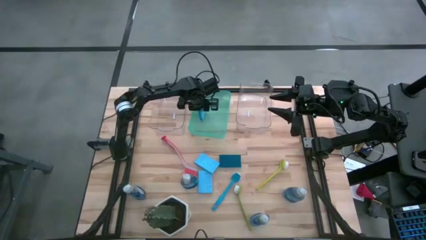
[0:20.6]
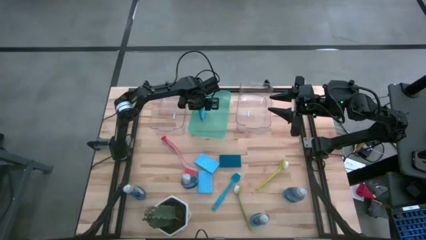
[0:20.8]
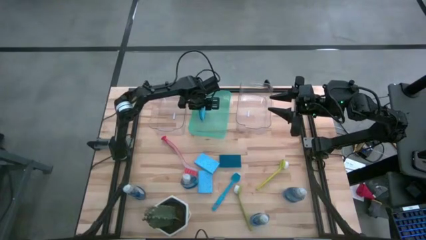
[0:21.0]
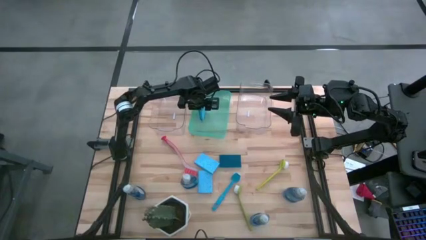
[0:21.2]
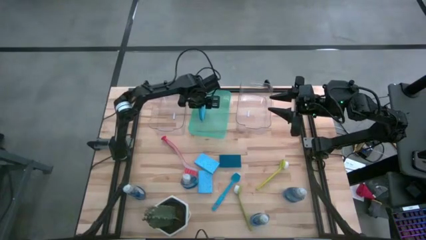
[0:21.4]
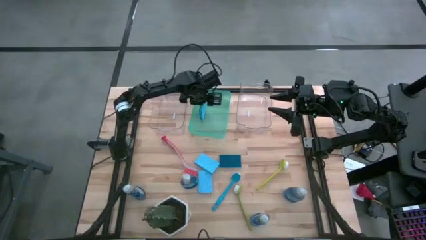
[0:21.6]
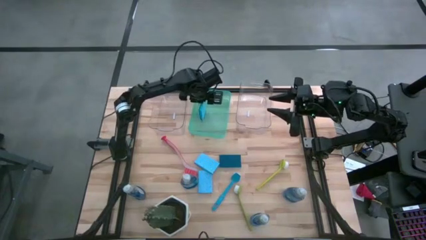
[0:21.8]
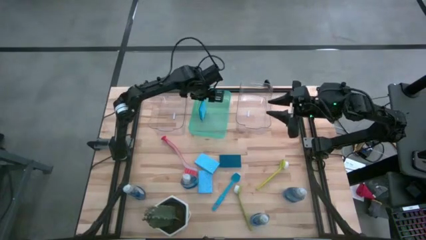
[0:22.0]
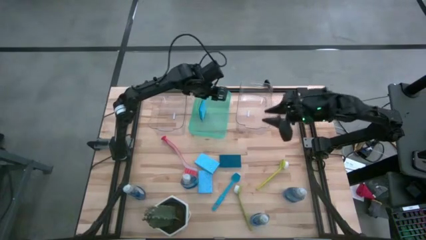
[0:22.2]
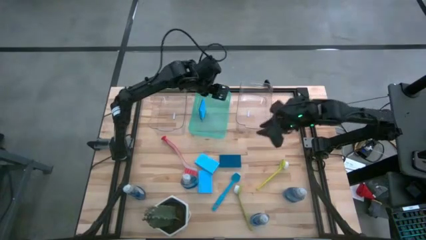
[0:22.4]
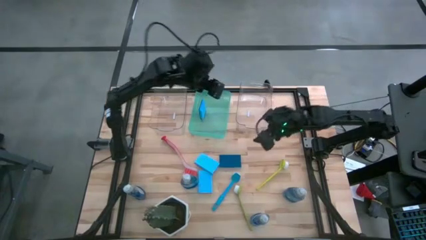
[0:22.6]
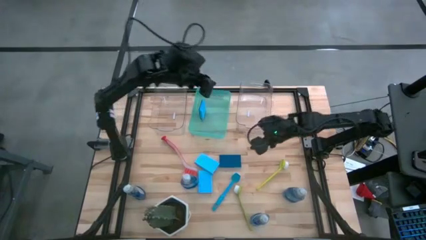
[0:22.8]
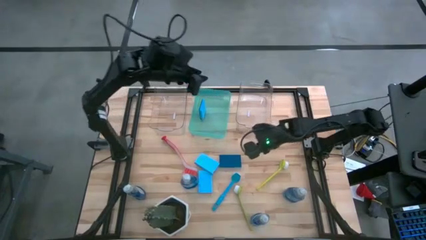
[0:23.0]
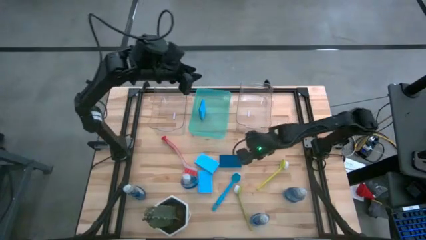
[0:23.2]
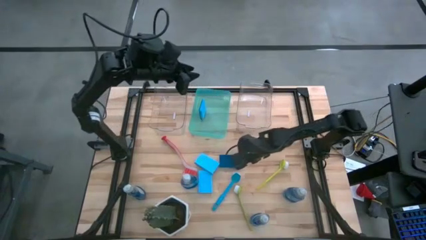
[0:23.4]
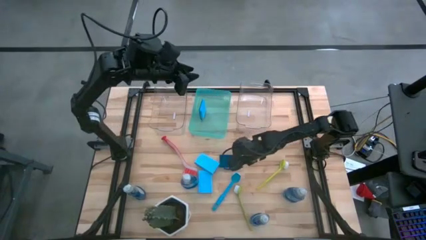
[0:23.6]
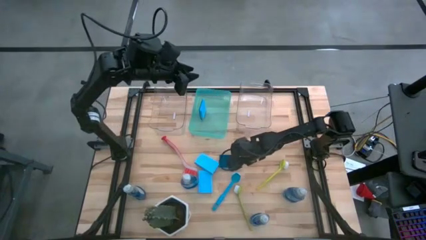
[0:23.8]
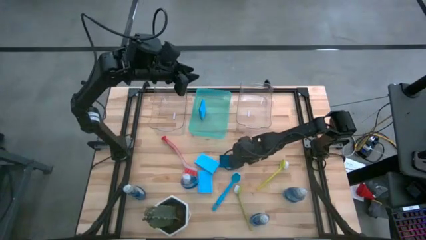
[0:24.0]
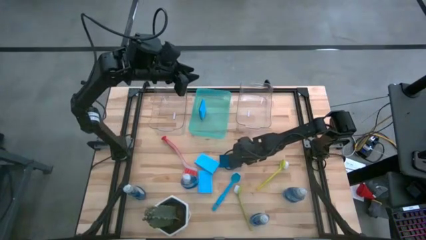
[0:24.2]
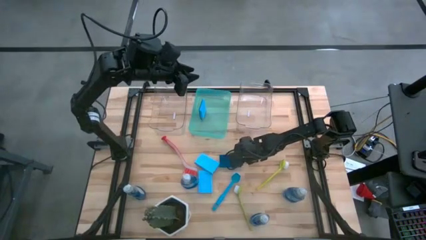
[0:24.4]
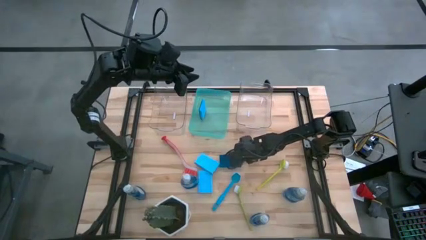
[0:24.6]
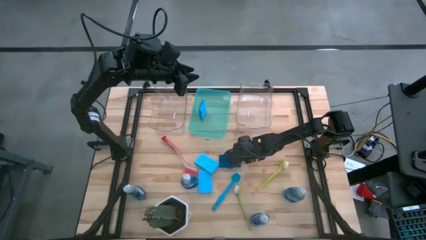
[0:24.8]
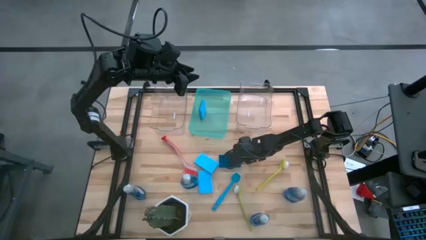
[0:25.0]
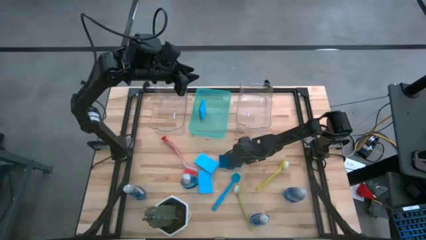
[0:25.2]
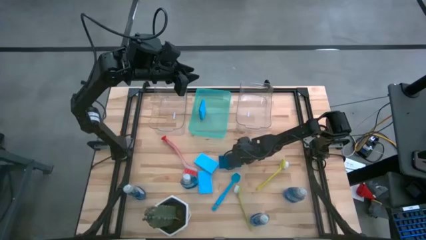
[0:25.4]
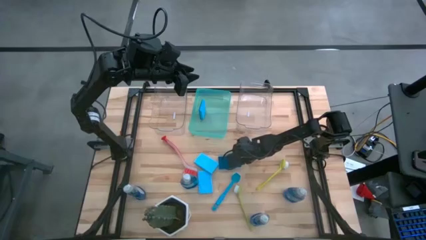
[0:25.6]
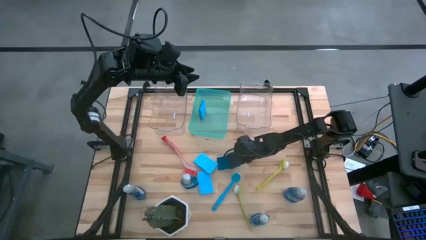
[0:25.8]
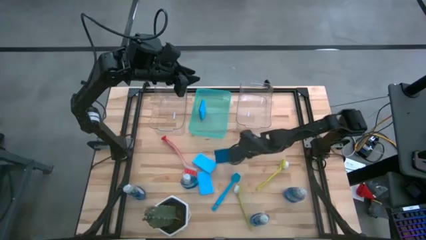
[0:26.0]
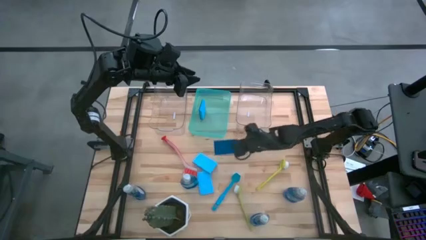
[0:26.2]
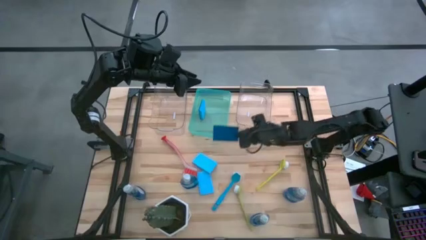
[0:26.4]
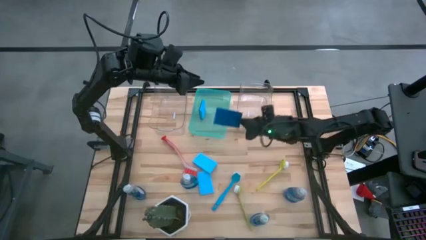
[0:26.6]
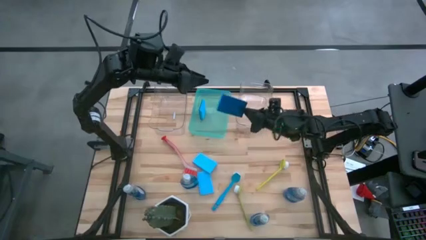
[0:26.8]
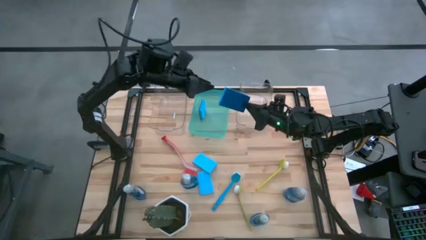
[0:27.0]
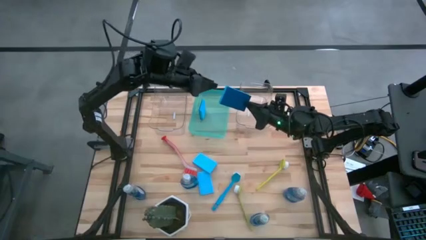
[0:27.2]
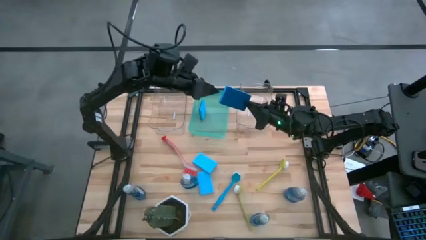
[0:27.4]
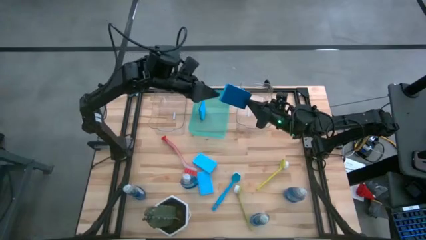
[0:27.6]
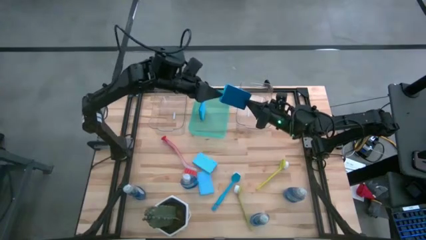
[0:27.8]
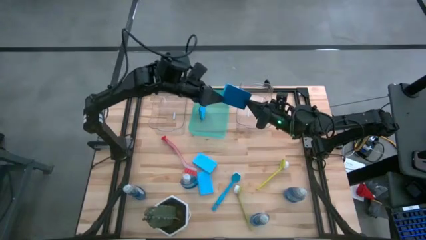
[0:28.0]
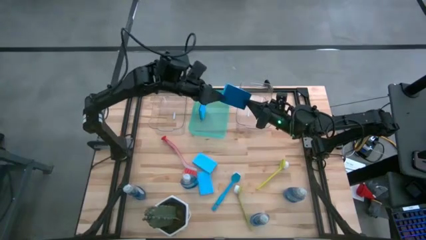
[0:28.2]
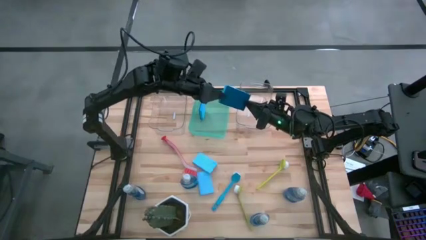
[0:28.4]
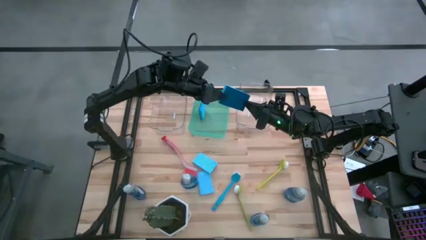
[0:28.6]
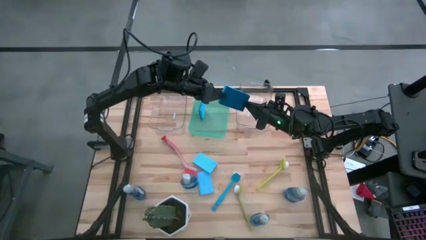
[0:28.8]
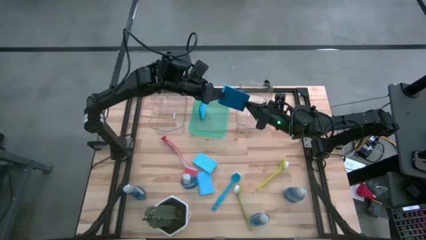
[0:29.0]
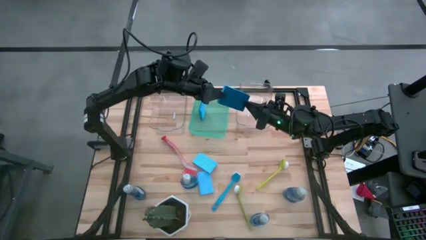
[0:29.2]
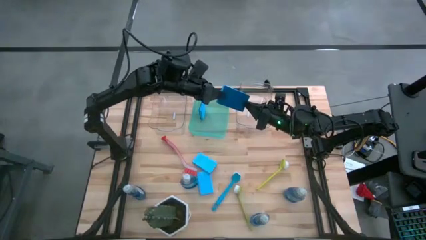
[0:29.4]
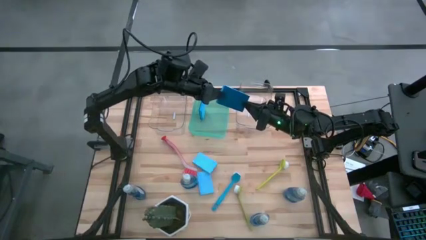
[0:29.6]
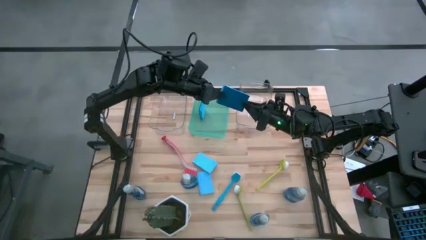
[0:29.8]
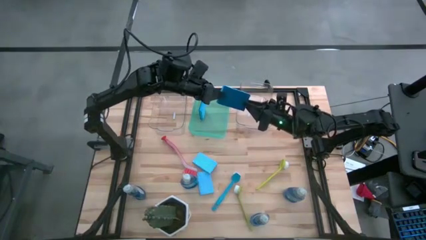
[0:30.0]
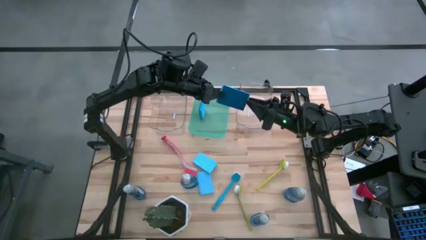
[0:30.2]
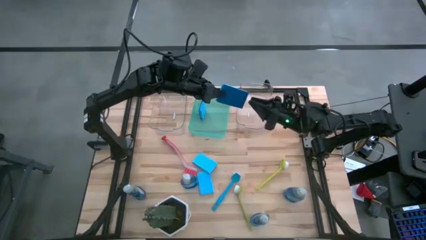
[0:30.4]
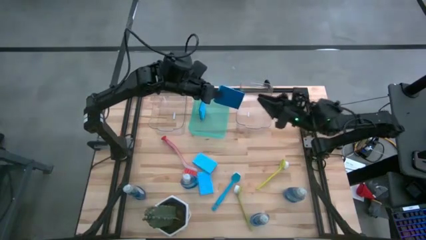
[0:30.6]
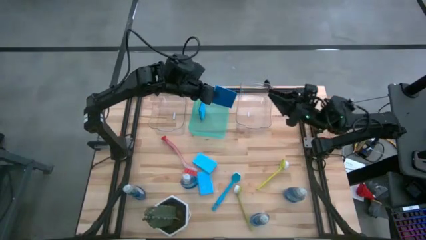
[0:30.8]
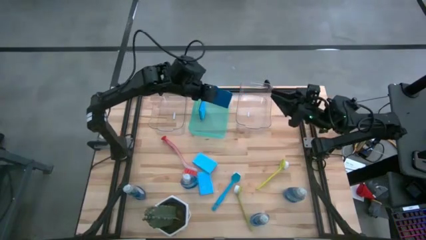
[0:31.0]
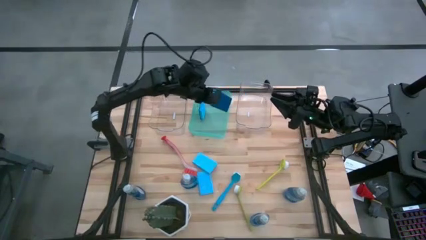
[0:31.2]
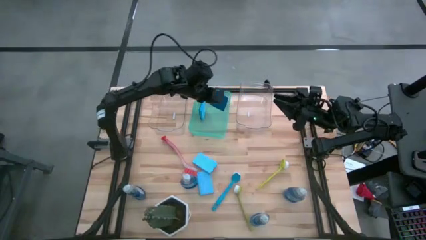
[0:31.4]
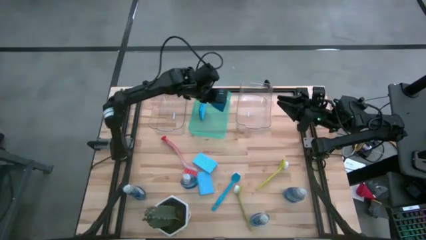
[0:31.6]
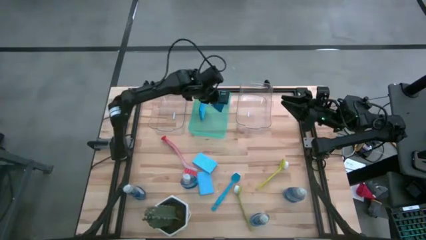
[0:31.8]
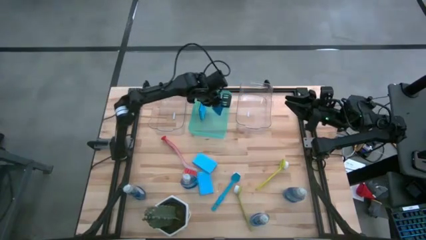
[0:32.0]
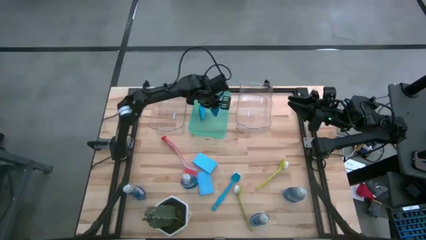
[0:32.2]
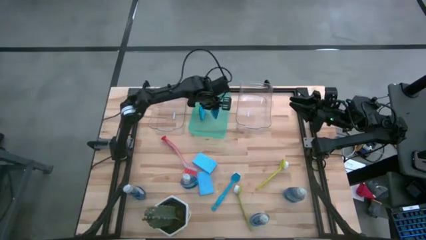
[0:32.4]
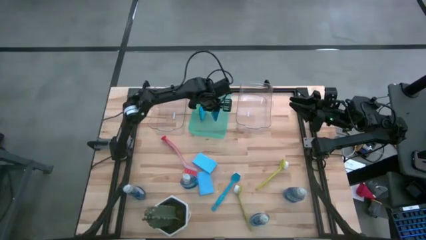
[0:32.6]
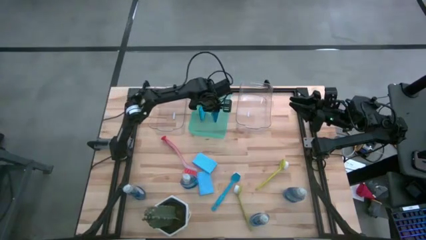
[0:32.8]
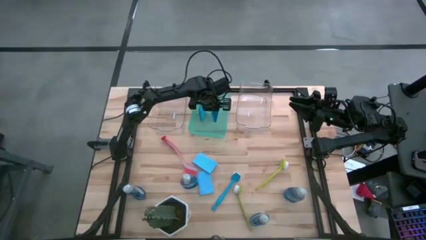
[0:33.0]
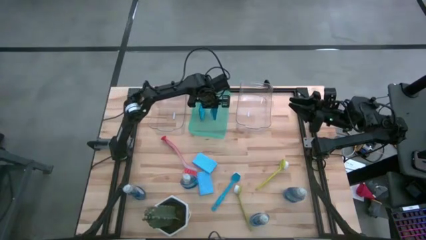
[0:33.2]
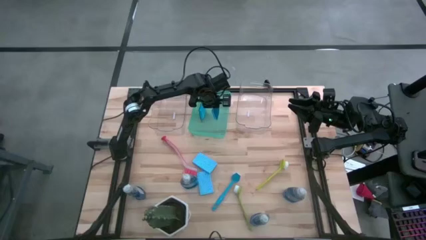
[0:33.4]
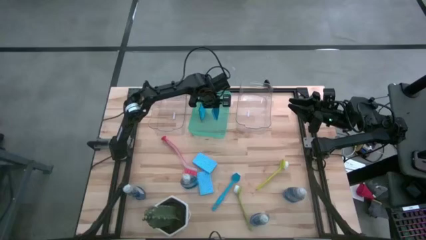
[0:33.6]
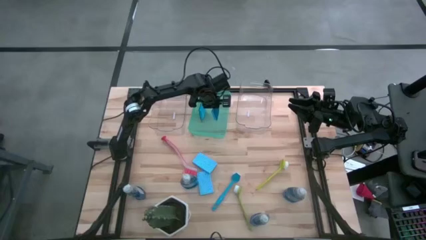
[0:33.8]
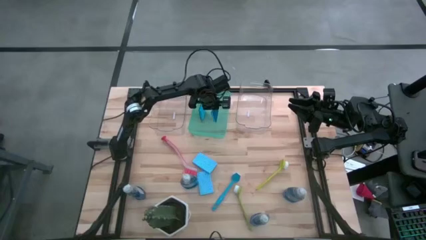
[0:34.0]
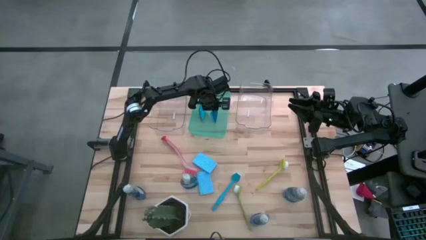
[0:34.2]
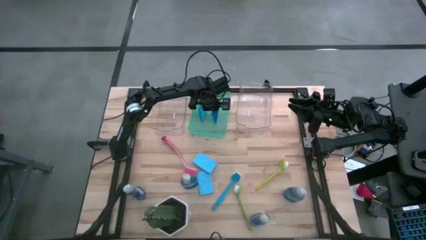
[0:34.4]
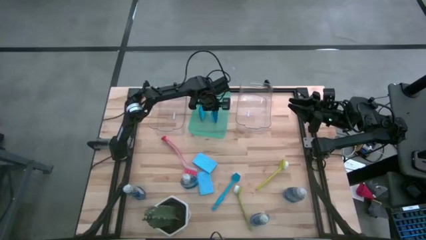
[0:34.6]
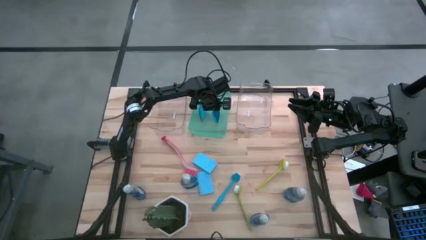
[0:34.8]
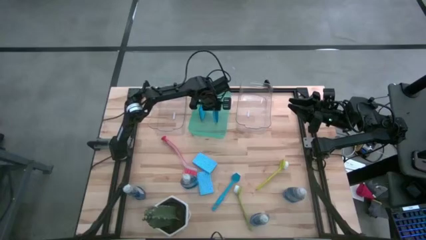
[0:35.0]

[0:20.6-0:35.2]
Task: Pick & Place Kitchen Sink Supplies
Put the sponge into the green bin
